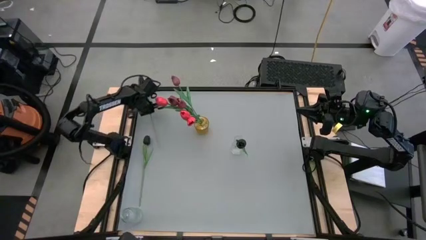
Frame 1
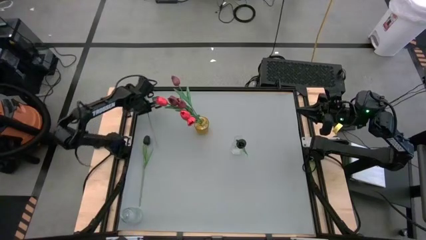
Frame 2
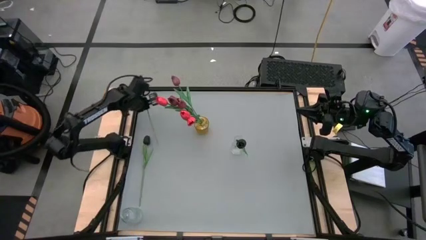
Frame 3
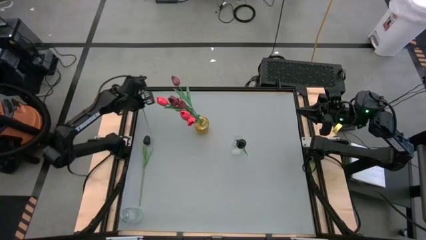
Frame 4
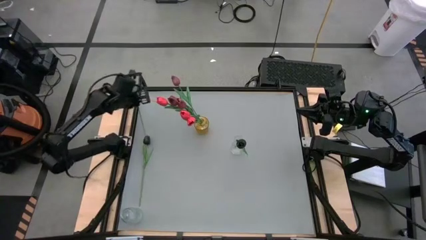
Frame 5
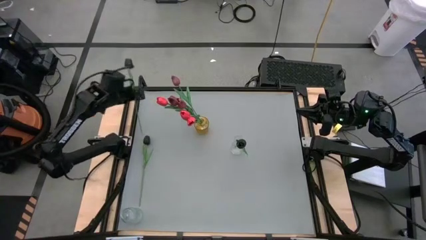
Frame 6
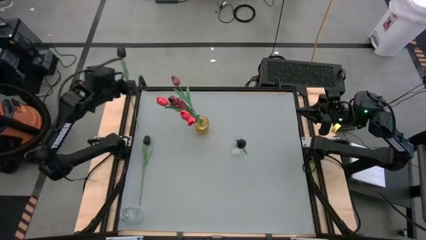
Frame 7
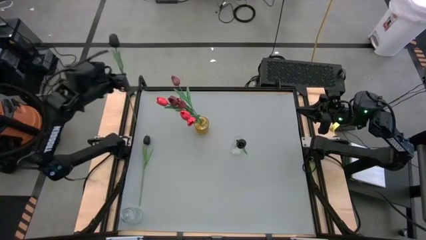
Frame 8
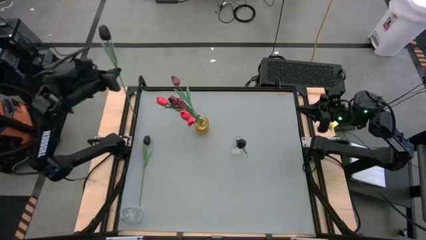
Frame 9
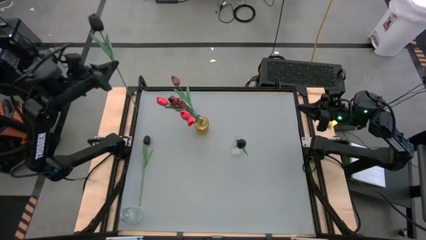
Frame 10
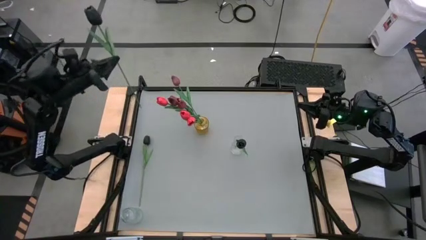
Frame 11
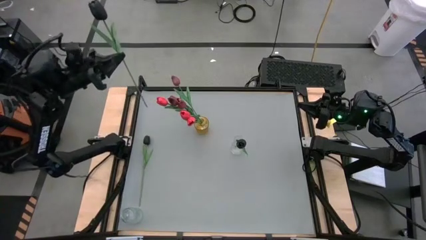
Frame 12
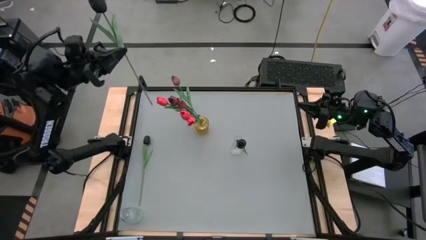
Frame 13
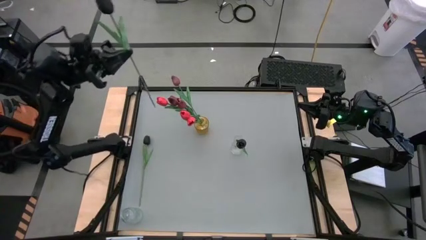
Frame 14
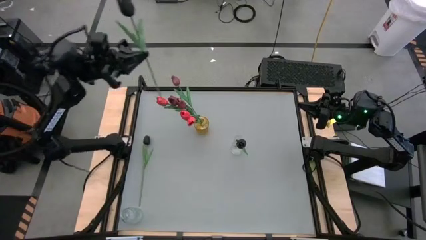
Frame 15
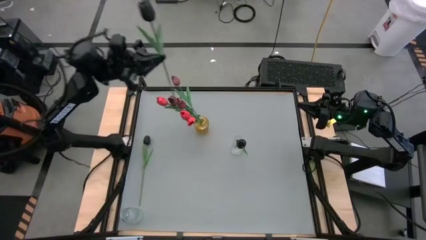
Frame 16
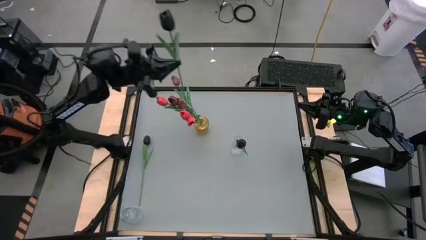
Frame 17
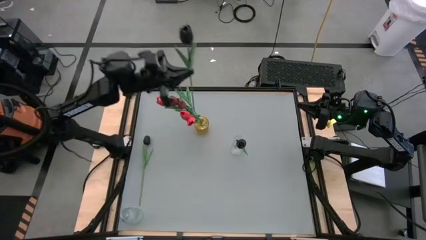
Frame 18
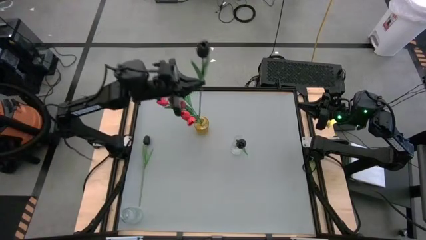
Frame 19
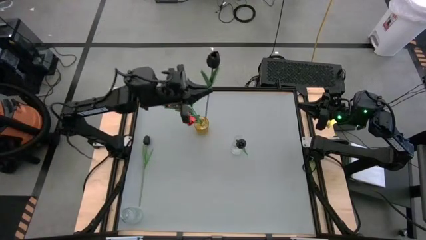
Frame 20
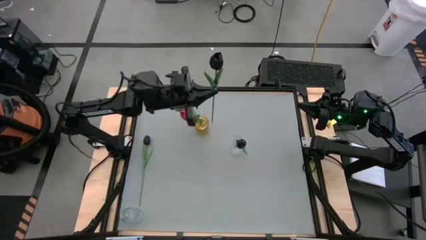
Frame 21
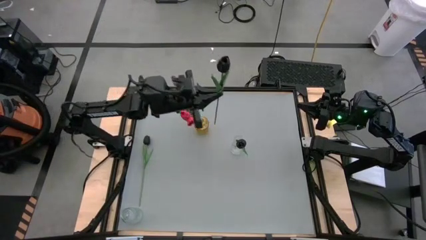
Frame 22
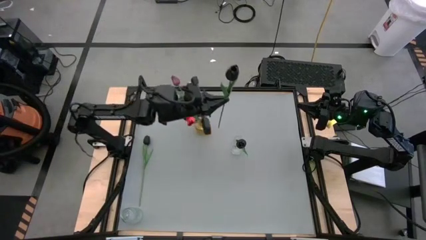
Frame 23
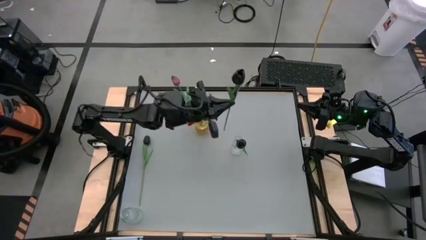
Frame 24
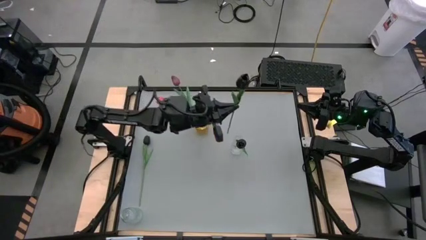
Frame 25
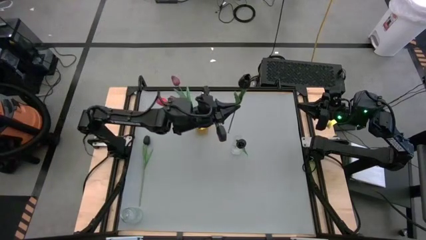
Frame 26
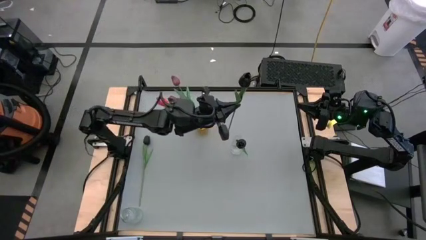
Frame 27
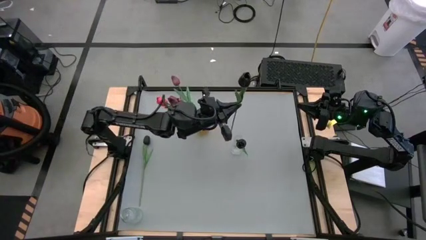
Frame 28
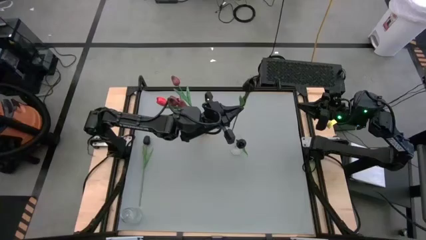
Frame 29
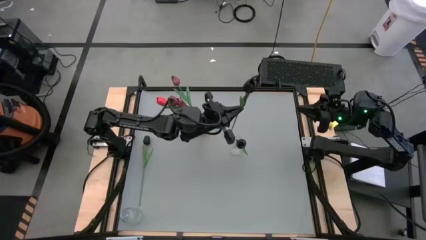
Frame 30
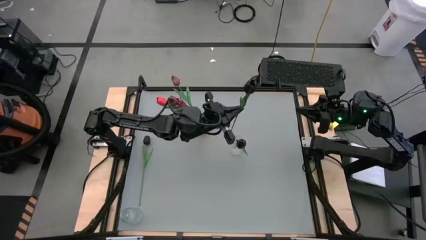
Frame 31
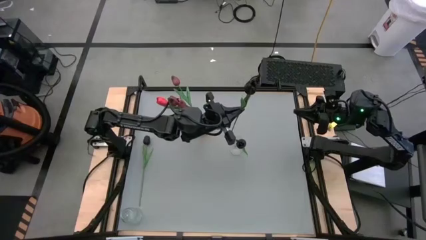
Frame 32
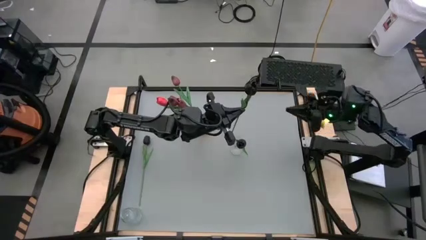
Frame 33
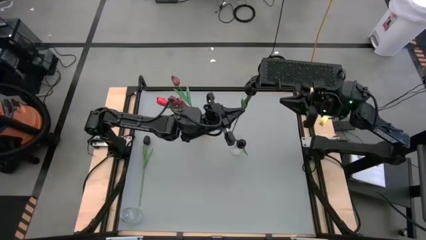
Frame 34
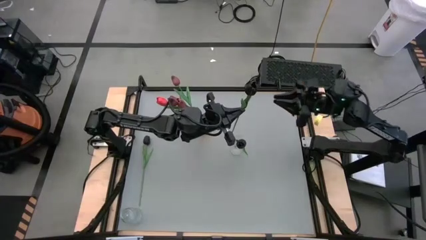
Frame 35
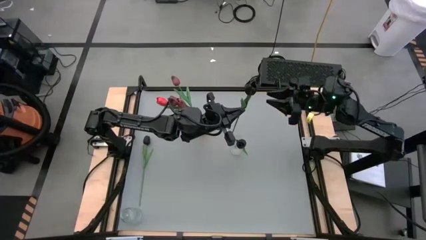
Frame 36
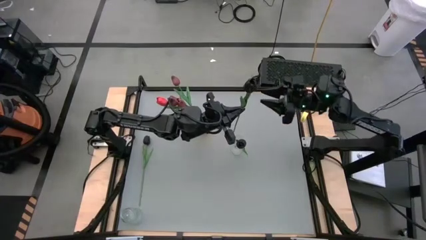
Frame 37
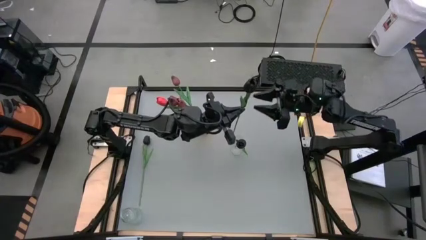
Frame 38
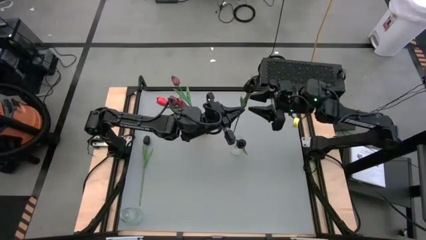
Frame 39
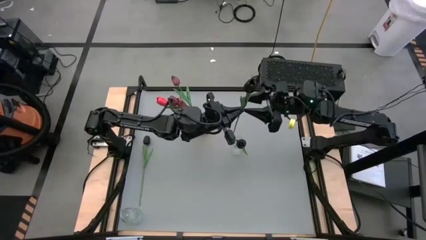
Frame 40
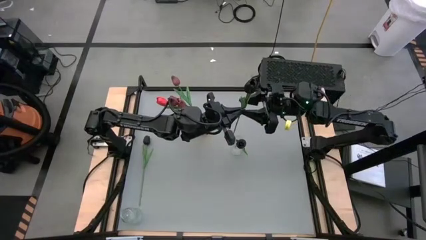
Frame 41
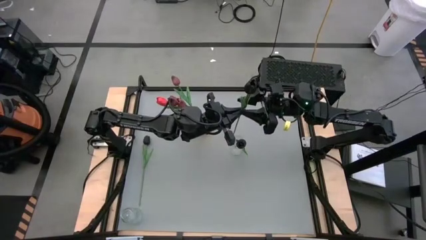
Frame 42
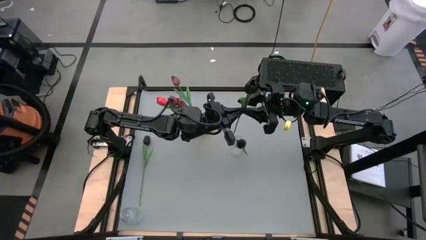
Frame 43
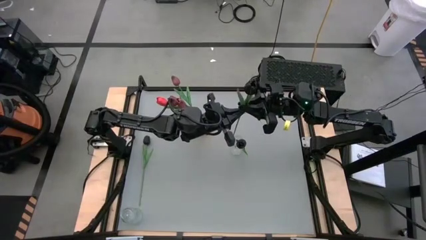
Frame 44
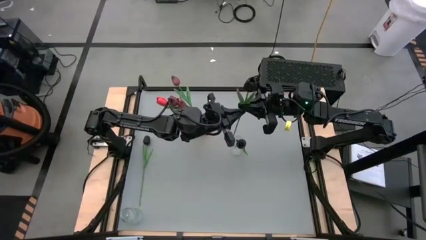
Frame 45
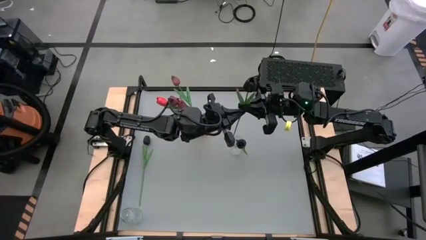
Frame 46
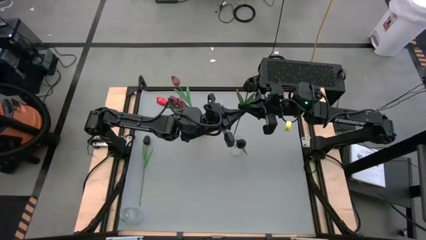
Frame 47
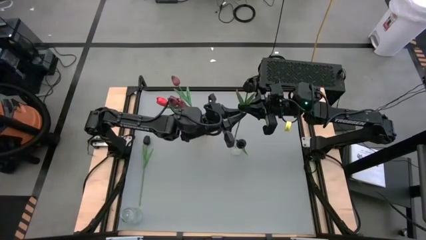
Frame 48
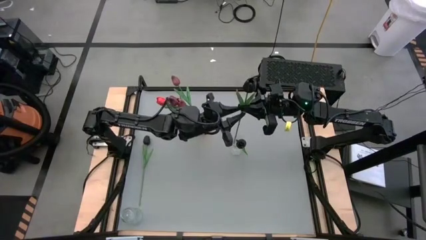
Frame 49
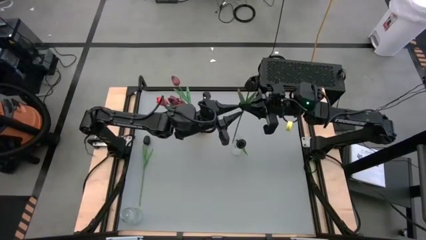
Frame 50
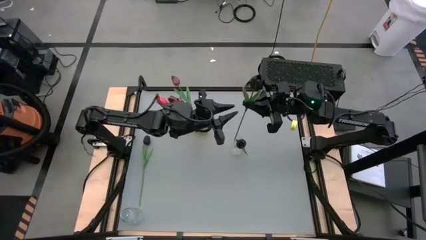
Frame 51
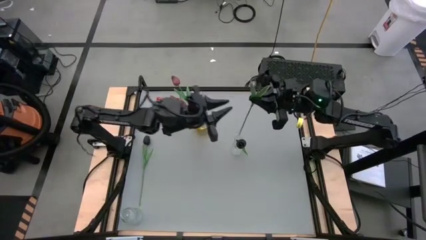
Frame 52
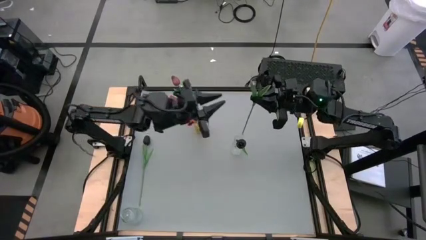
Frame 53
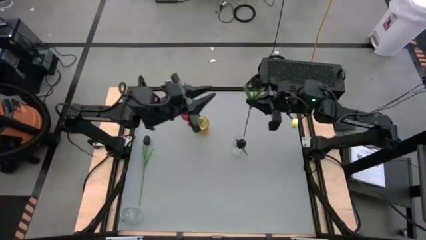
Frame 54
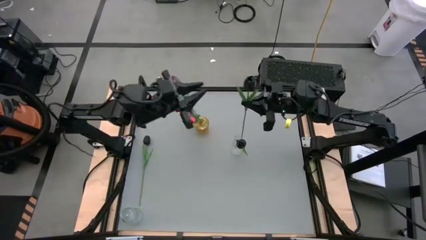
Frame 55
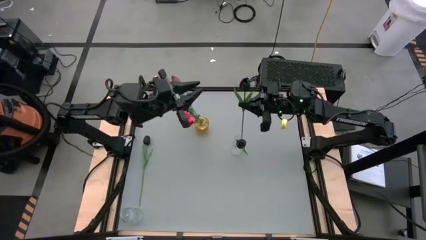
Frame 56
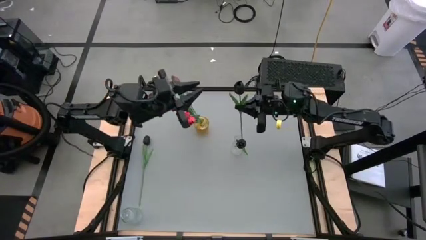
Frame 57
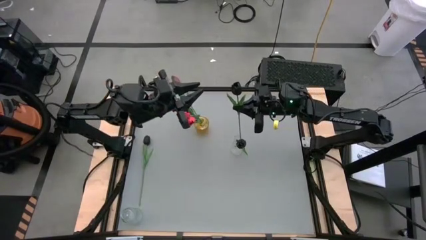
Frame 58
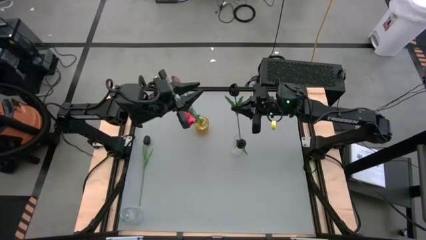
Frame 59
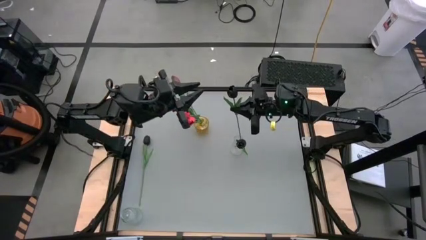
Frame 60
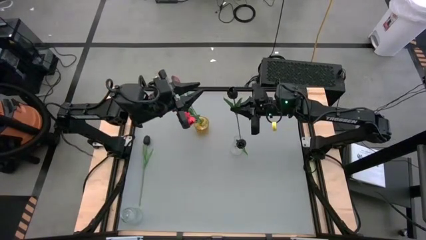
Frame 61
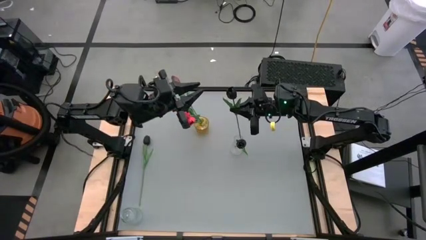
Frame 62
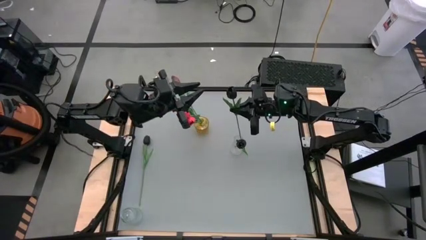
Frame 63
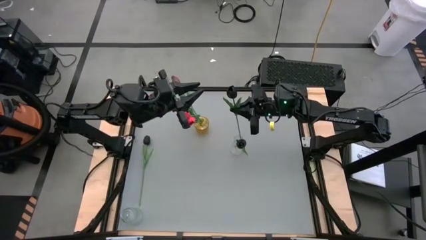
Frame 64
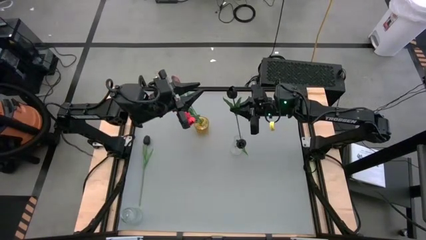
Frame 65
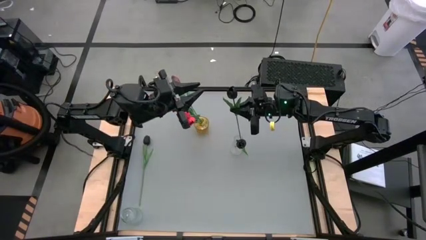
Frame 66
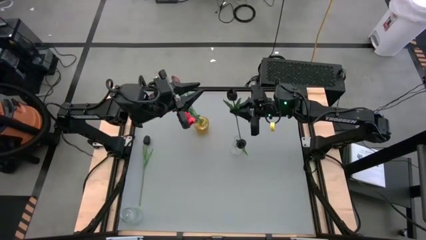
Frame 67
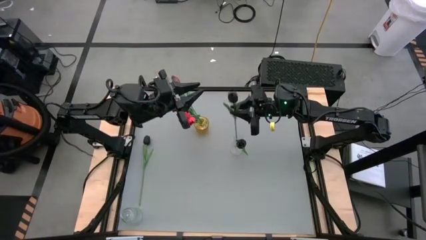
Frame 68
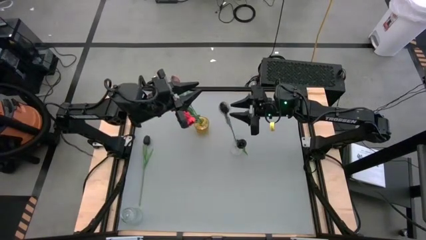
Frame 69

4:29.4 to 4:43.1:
Task: Sort flowers into vase by color
Put the top black flower into the transparent vase
